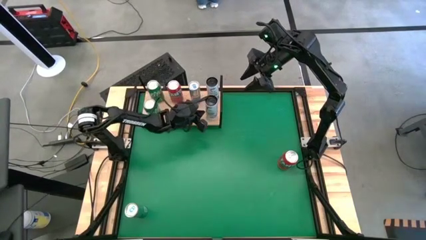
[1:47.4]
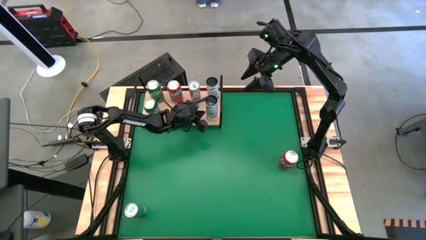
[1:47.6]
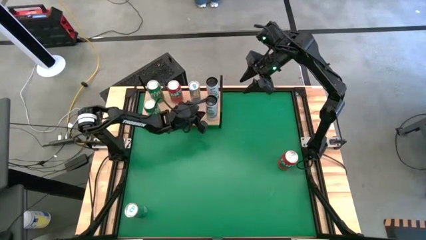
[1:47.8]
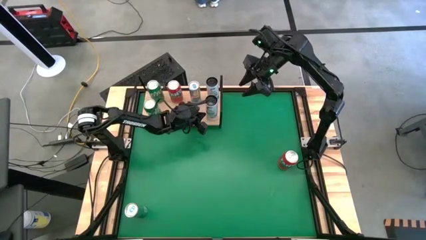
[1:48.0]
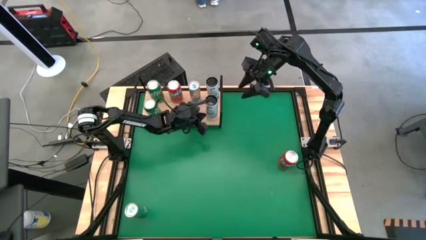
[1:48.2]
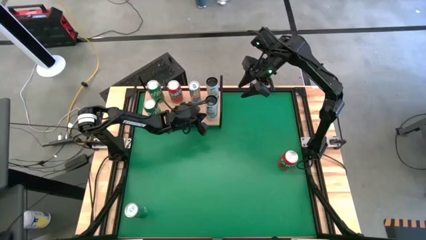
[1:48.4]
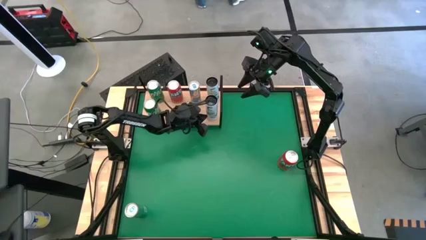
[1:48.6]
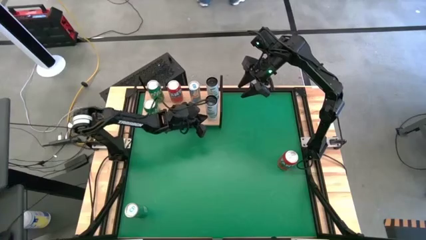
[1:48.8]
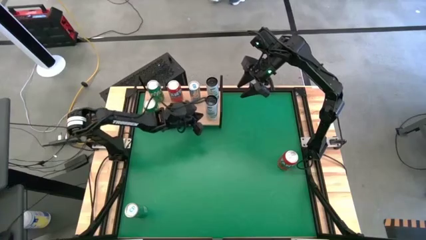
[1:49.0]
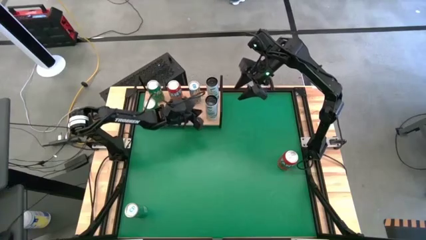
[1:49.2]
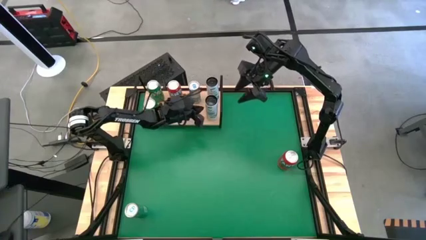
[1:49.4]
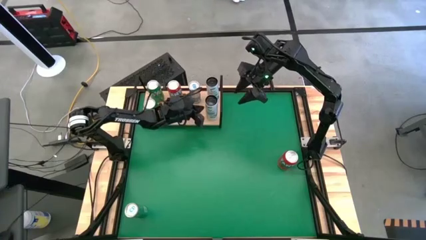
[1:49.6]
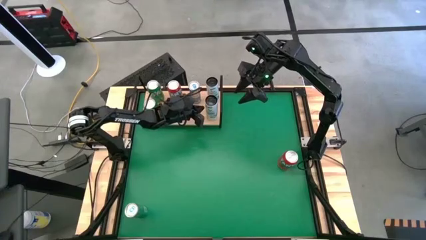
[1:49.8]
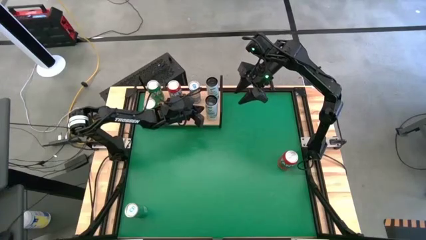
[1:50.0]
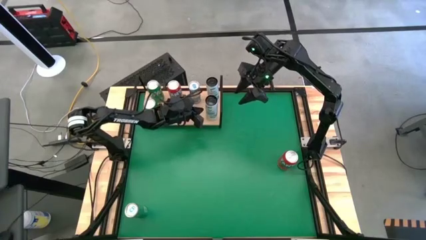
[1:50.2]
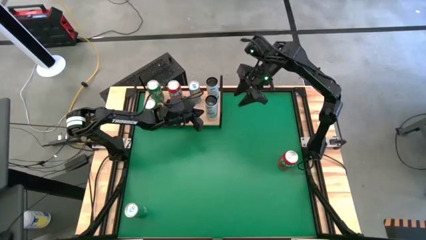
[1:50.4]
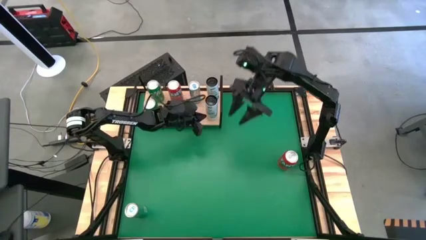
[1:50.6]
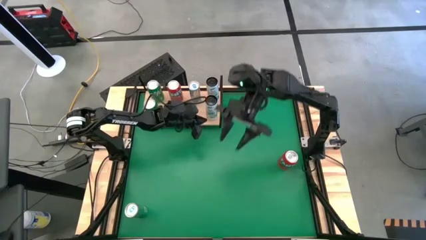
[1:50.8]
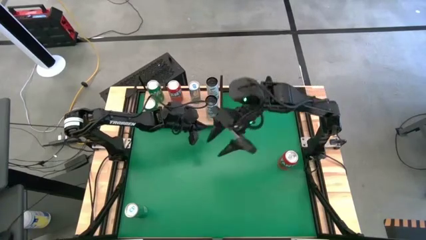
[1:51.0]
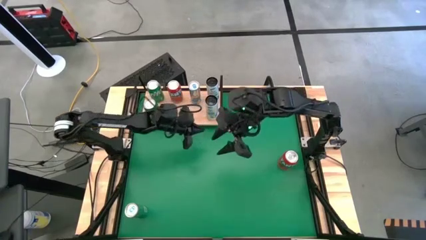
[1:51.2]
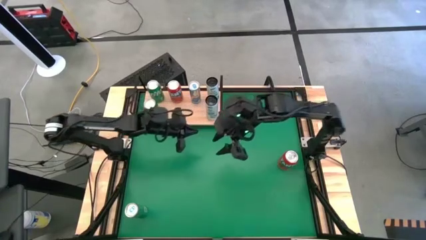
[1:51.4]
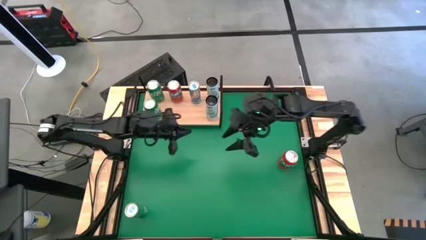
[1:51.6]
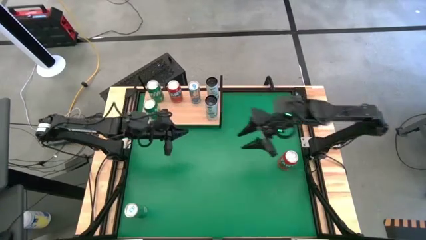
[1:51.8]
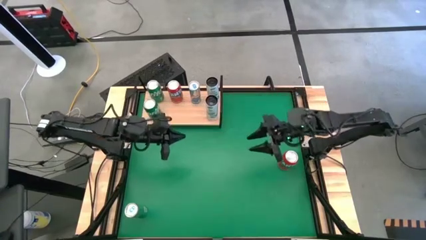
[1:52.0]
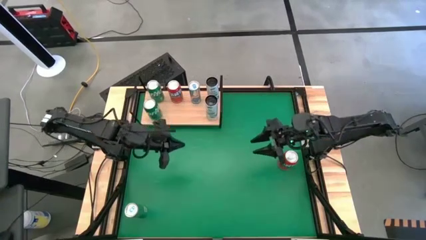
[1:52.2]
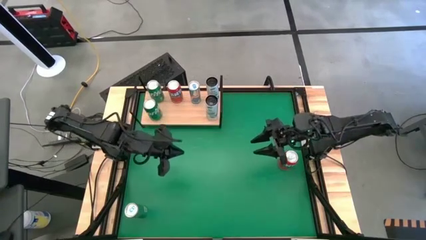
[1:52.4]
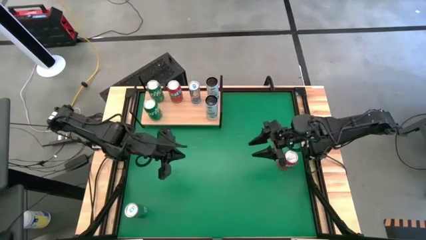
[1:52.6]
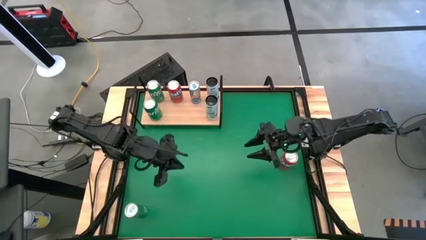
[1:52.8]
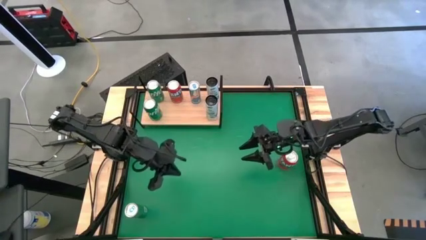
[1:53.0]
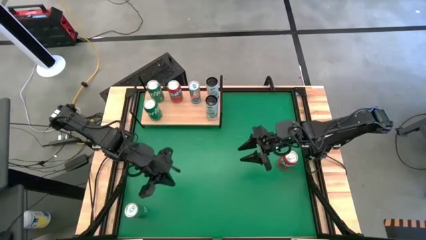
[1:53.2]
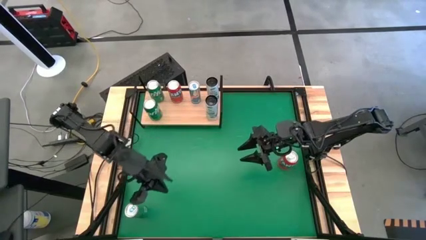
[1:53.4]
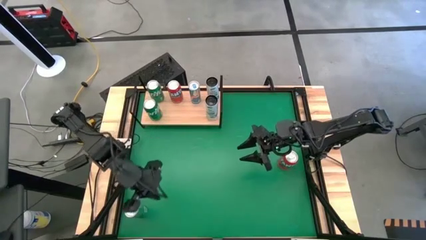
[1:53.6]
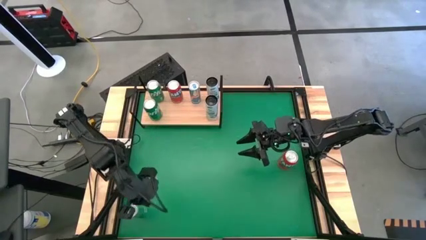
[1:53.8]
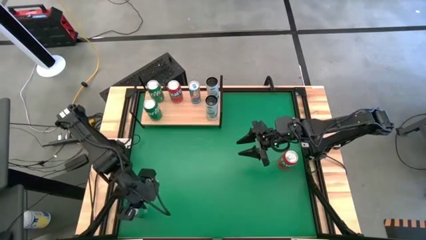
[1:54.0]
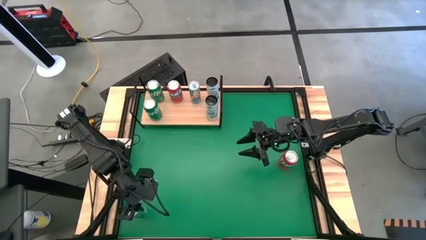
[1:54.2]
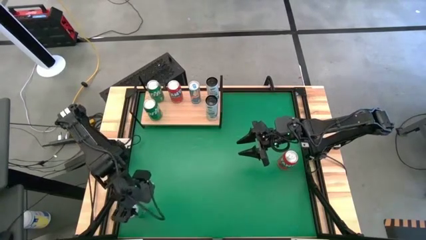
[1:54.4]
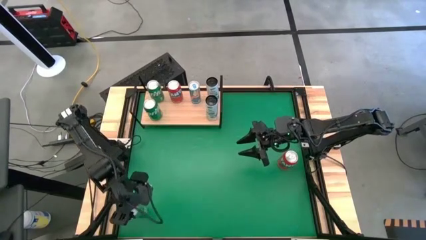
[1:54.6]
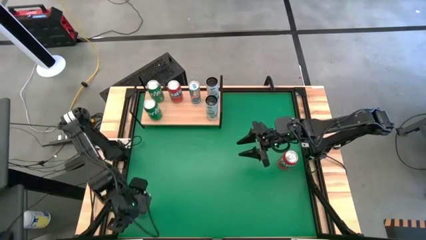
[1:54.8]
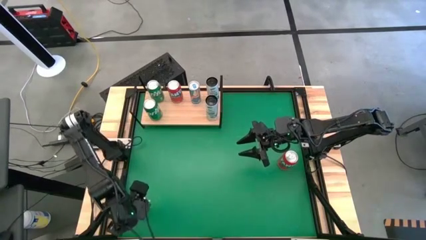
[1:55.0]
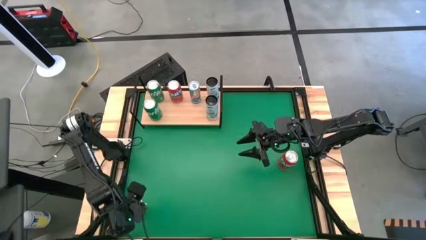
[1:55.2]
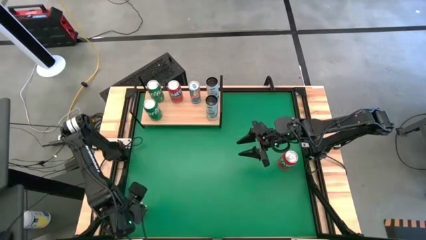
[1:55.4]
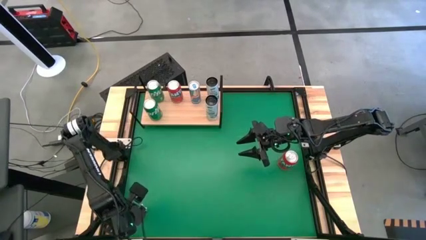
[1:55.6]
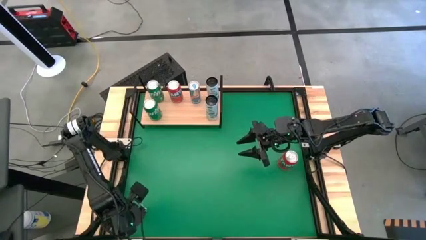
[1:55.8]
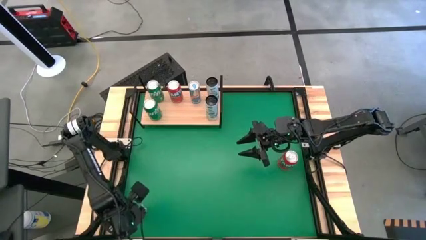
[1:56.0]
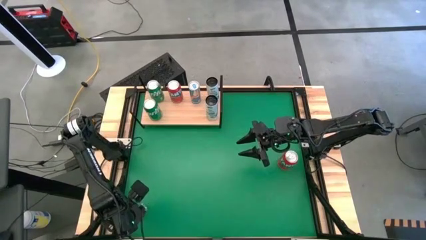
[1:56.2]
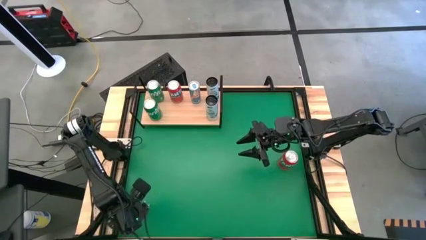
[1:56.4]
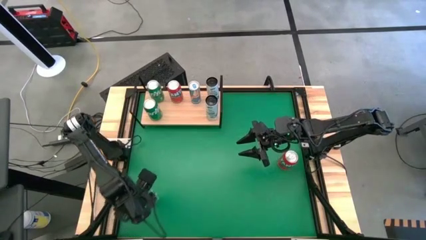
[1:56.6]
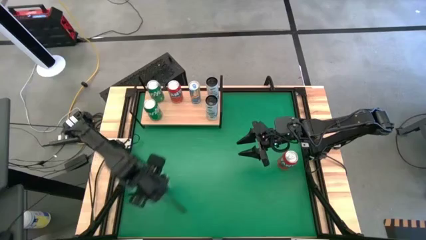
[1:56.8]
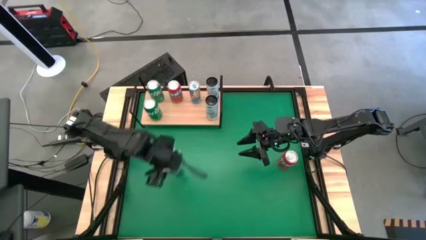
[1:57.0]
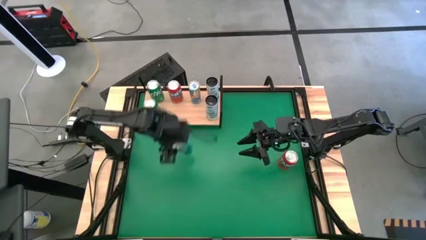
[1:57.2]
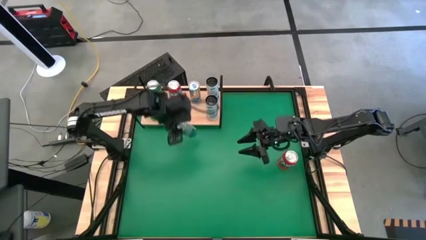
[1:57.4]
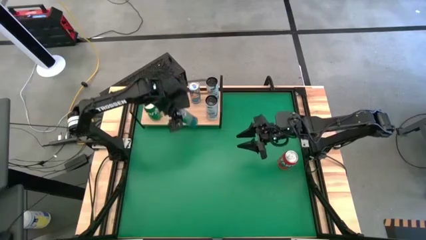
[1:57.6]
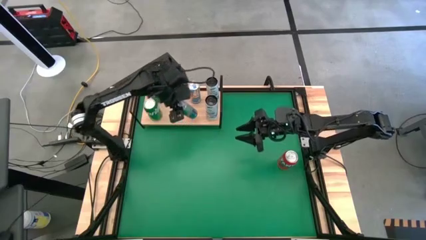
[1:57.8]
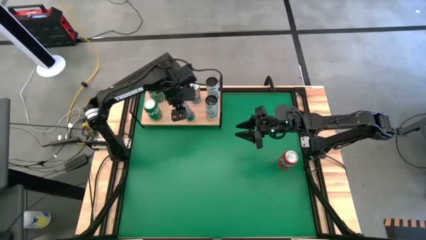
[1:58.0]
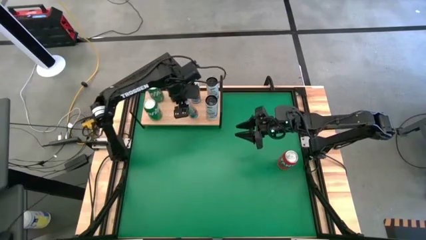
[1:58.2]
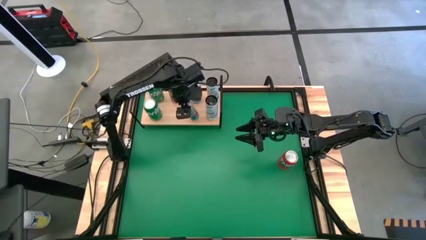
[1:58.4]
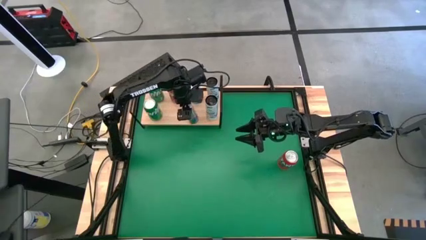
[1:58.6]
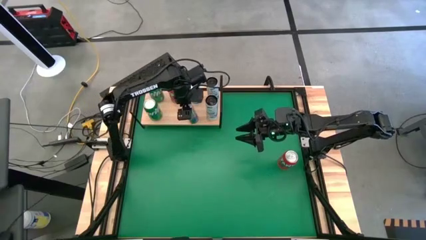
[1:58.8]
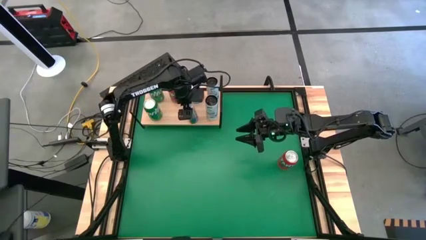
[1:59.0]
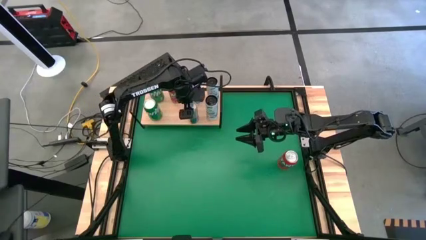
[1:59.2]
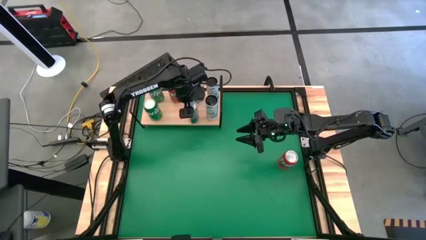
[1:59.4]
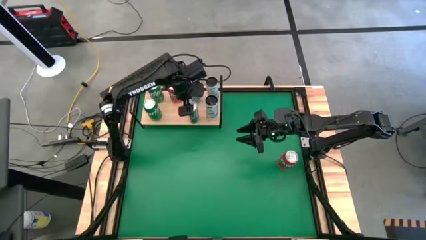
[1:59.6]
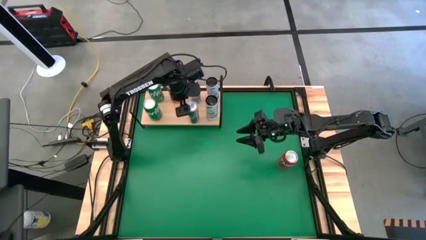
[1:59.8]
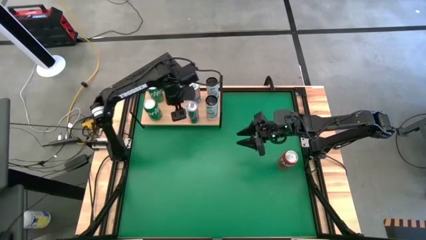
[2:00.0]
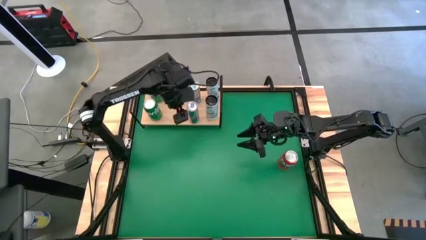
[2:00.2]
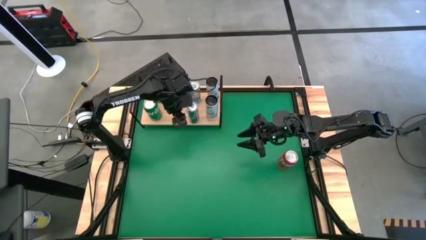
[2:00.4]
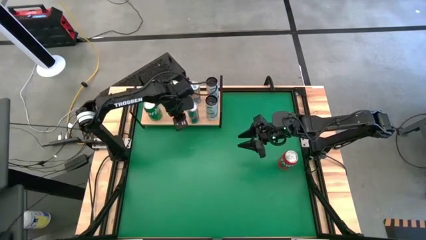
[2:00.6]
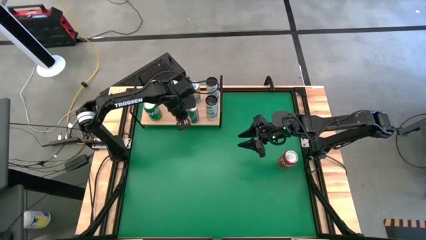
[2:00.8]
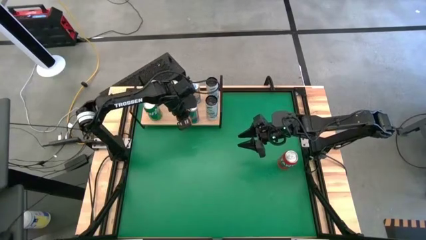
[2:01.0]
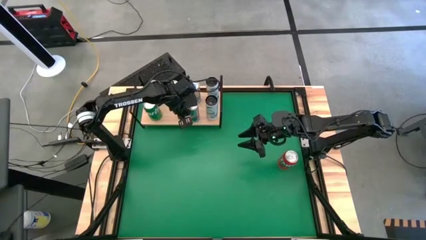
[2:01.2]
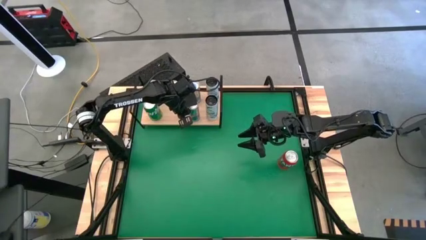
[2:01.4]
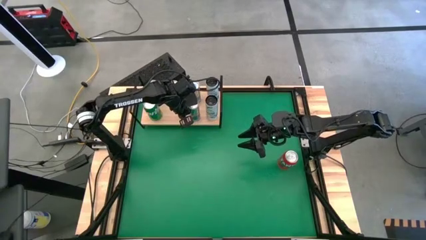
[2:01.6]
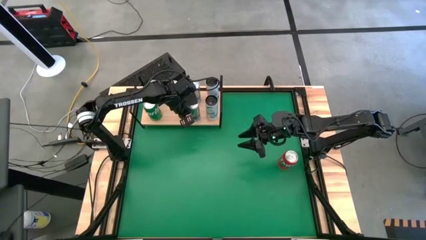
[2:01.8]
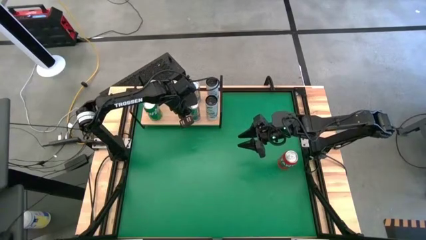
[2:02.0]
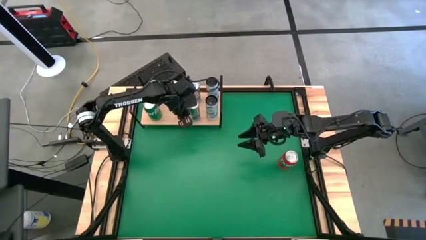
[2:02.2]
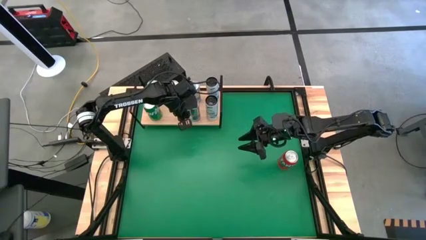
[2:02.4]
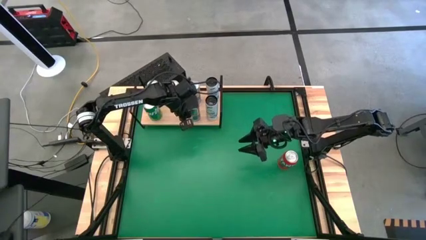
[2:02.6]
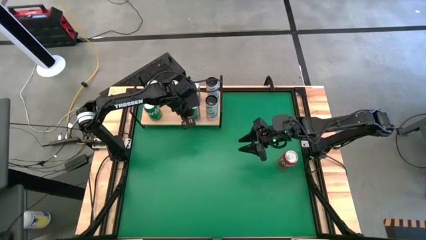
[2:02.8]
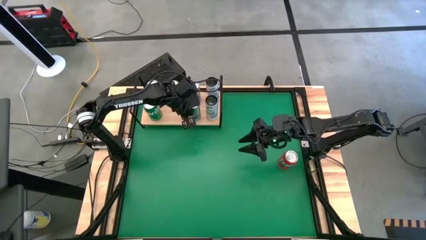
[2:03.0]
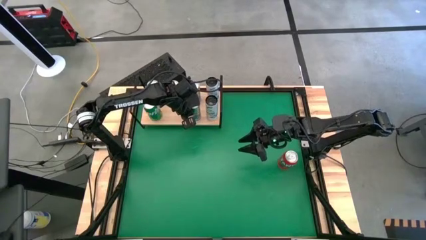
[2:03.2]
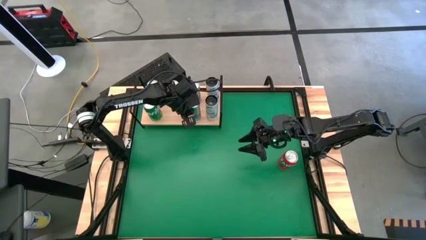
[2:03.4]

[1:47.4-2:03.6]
Task: Place canned beverage on shelf
Put the blue soda can on the shelf aligned with the other blue soda can
